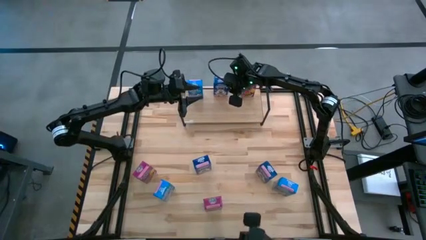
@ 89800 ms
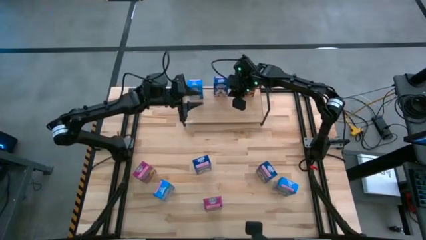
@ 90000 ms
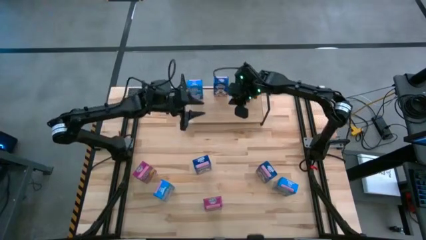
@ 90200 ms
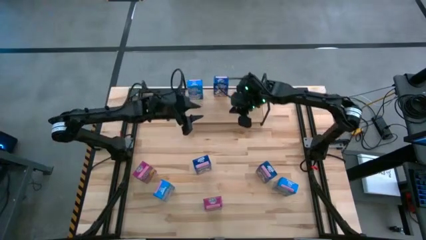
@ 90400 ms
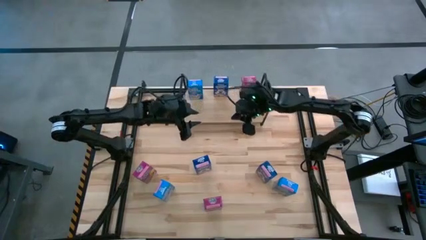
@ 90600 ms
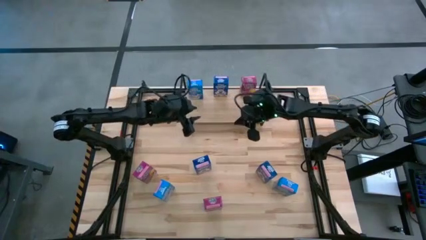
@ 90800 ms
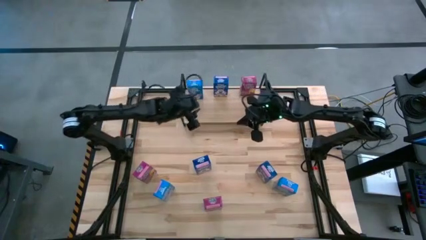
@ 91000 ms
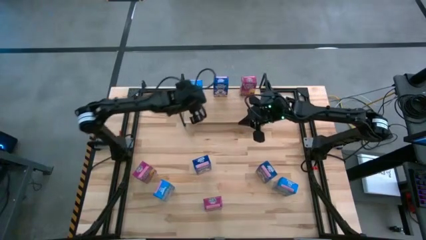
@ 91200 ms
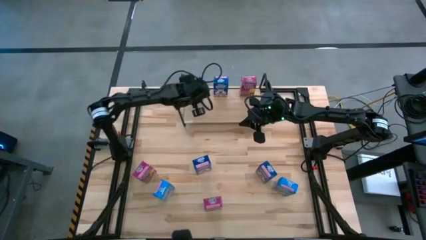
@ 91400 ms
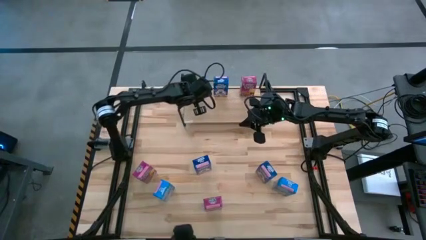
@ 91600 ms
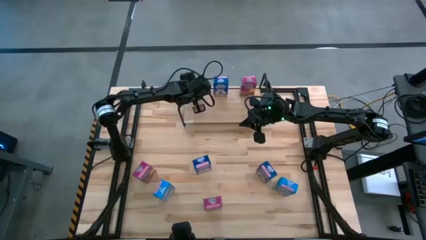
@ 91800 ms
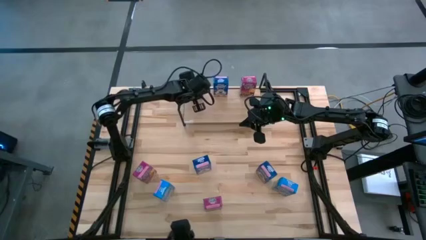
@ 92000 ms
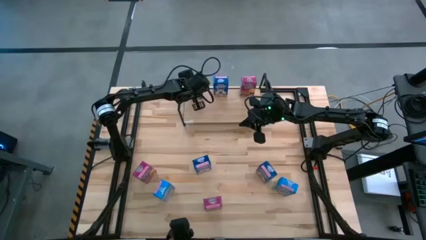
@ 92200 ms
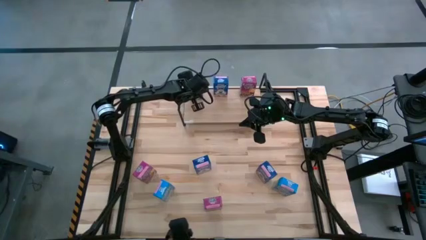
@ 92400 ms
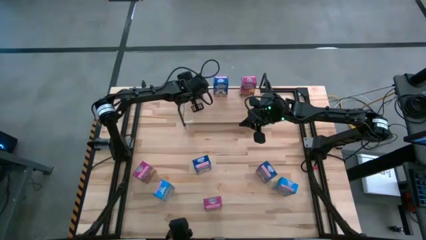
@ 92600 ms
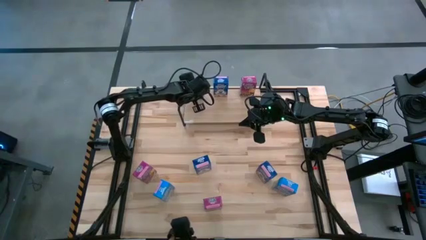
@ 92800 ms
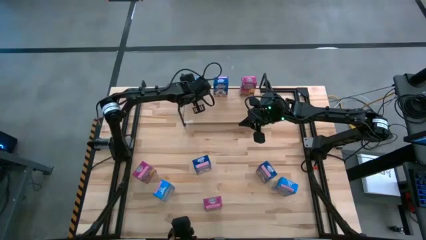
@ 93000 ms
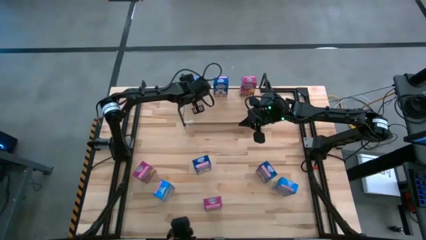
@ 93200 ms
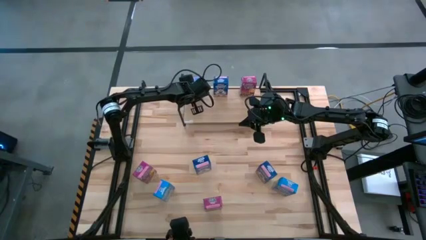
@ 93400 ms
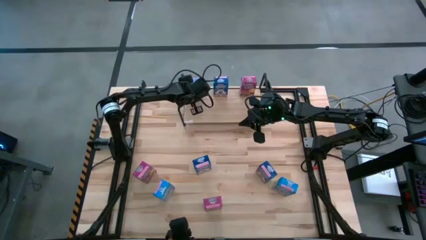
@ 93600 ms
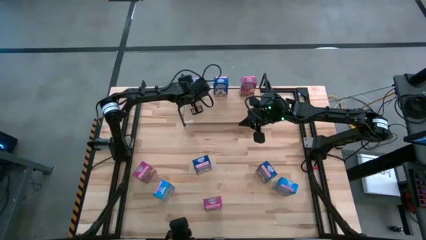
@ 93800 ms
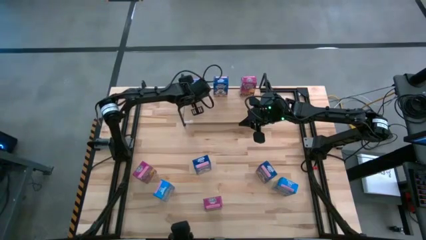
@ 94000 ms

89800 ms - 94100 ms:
Task: Stack cereal on shelf
Adjust the blue cereal box on the shelf

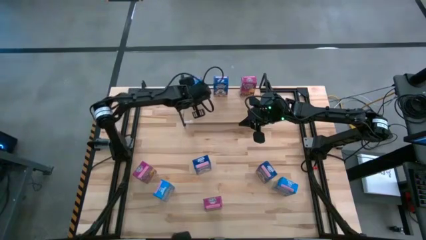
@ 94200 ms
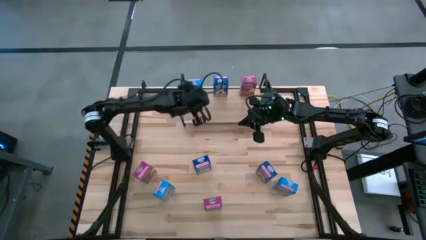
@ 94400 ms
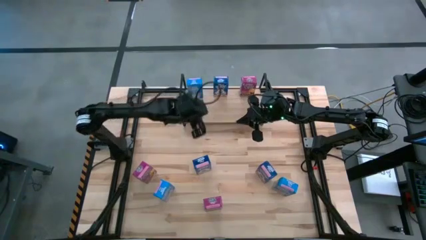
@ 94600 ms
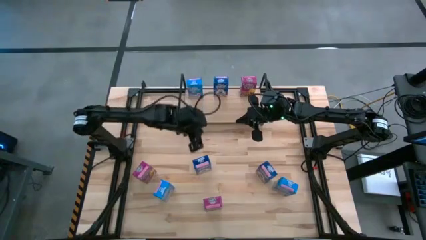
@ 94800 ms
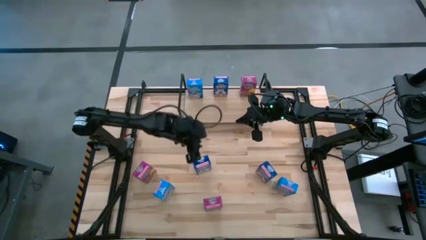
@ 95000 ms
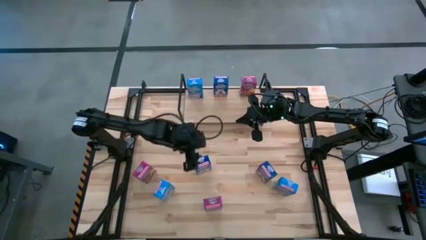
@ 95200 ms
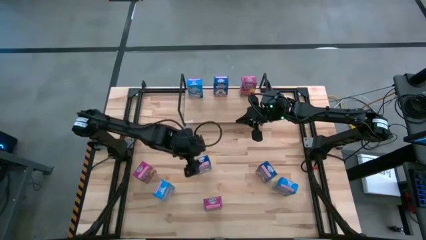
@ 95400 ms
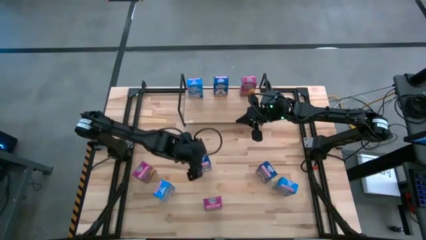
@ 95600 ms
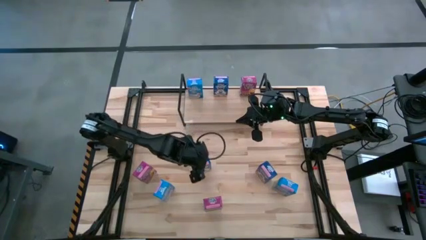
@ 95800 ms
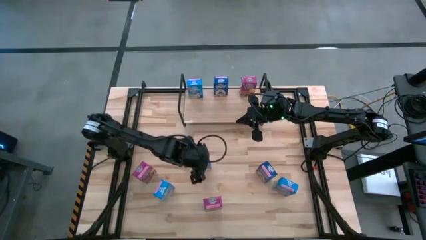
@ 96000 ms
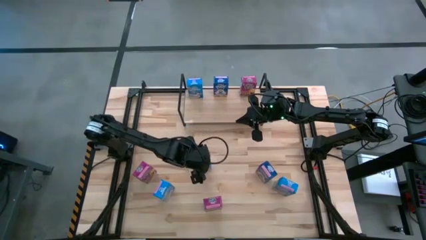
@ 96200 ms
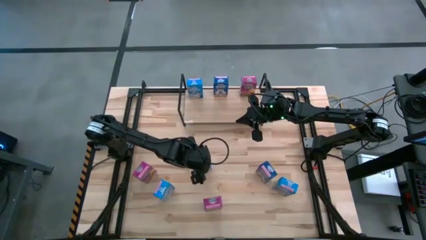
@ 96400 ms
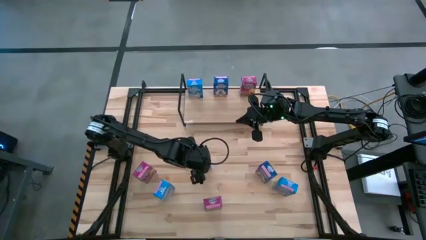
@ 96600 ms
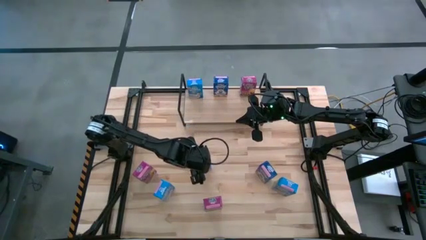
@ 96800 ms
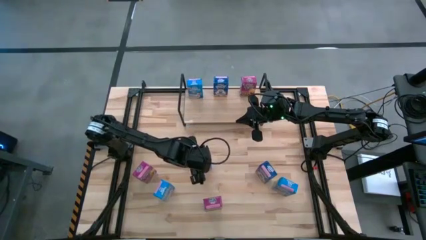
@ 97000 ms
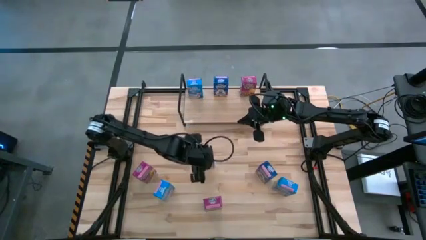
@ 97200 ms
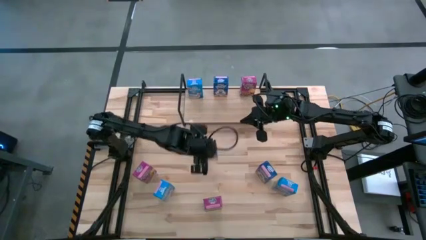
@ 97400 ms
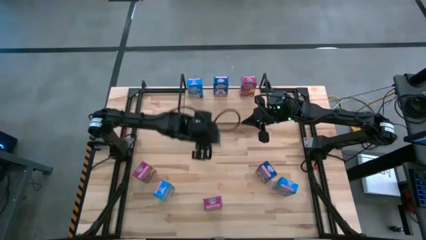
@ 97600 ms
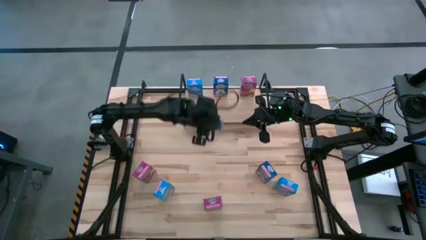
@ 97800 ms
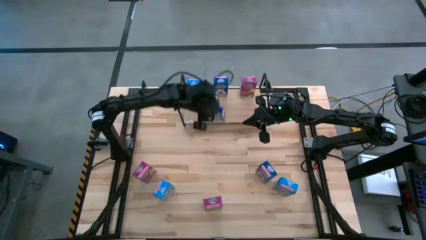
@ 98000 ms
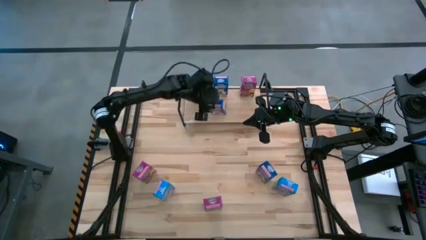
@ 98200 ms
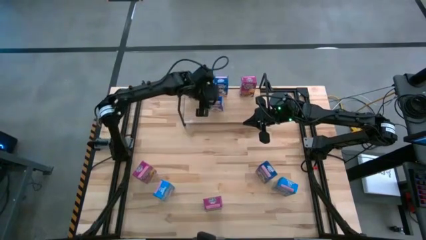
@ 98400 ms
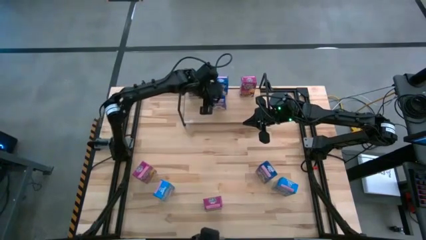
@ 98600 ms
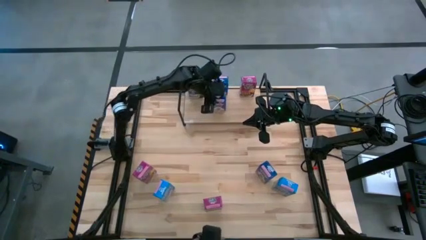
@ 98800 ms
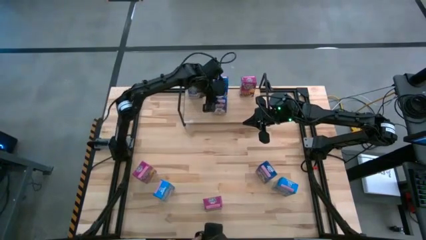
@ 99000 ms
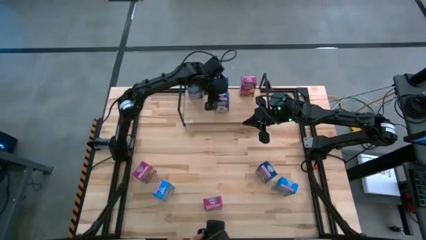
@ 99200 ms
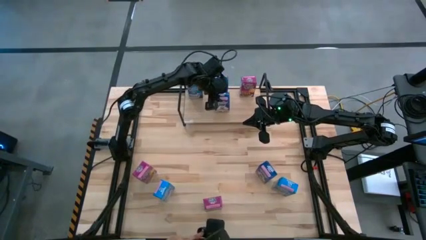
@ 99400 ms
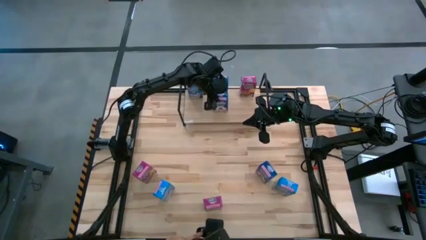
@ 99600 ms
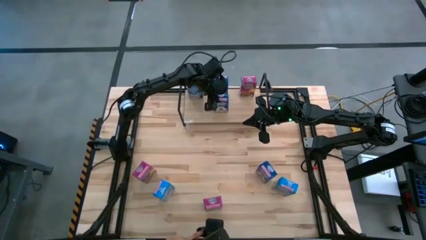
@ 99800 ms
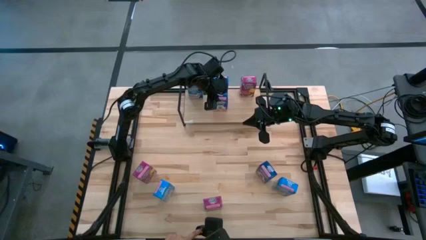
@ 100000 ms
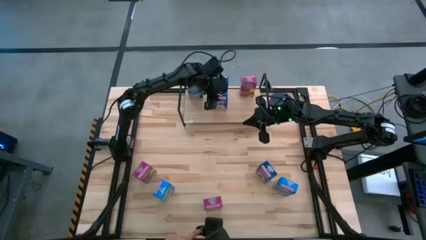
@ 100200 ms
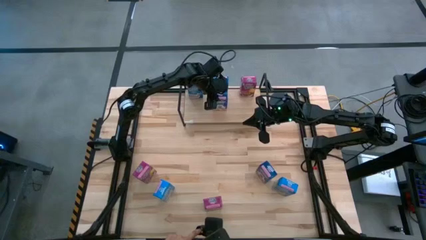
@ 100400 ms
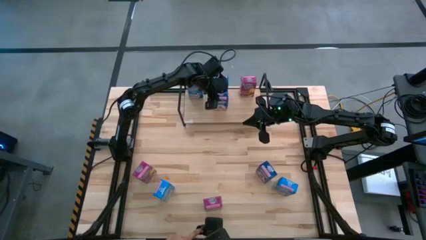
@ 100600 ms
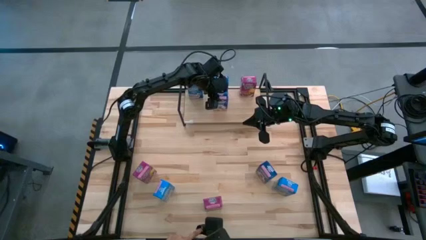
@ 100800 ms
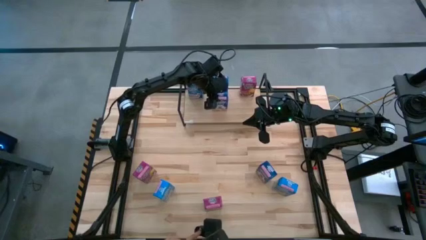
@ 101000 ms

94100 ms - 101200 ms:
Put the left dark blue cereal box on the shelf aligned with the other dark blue cereal

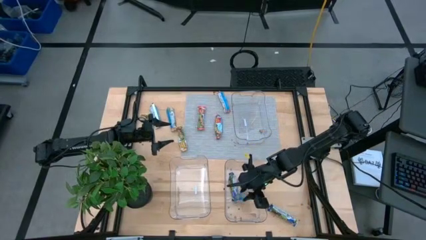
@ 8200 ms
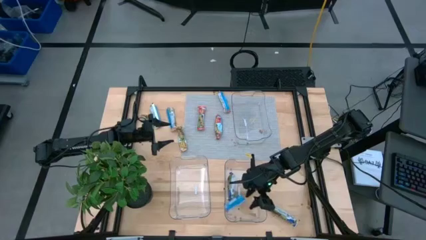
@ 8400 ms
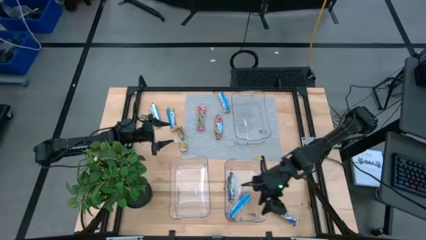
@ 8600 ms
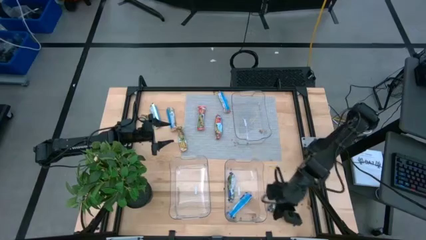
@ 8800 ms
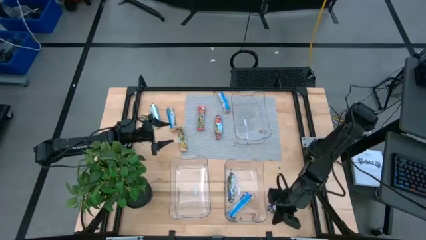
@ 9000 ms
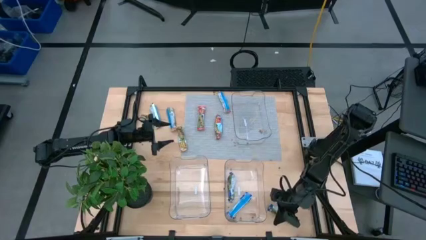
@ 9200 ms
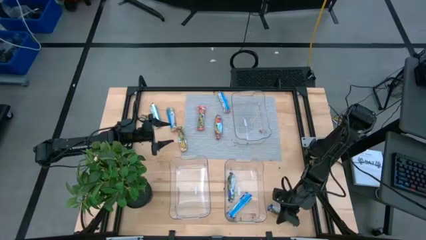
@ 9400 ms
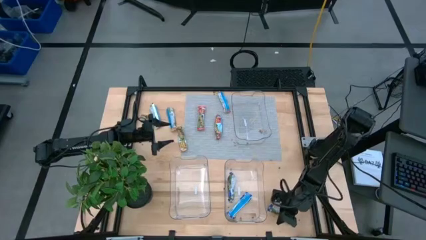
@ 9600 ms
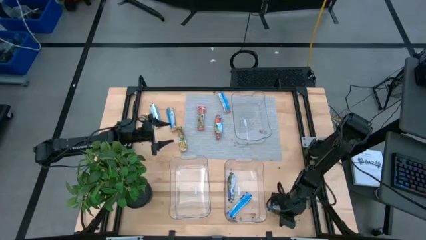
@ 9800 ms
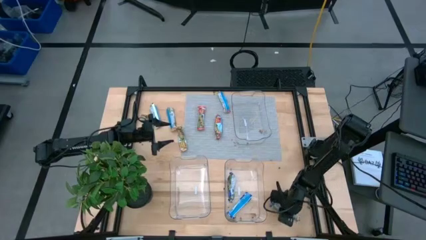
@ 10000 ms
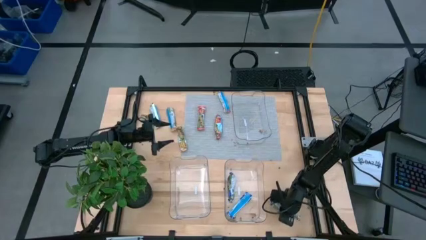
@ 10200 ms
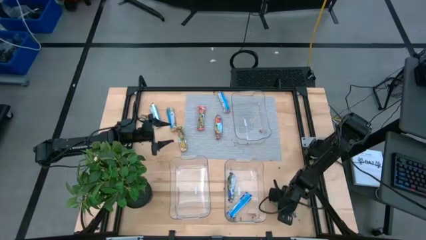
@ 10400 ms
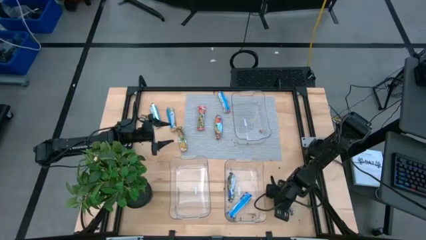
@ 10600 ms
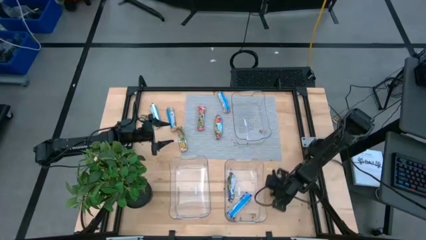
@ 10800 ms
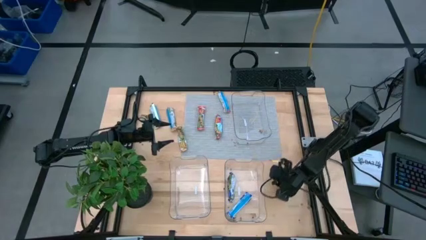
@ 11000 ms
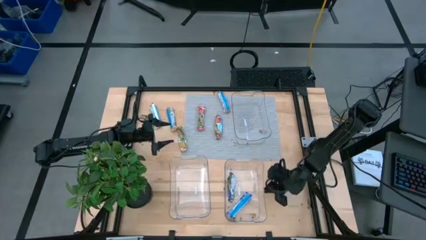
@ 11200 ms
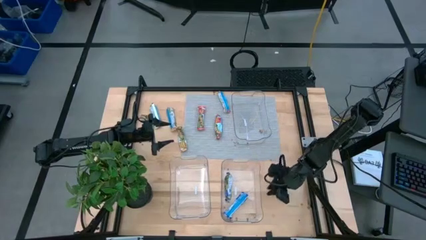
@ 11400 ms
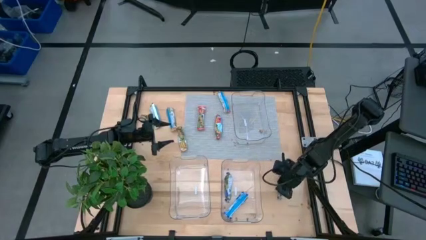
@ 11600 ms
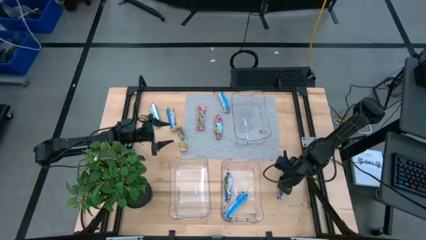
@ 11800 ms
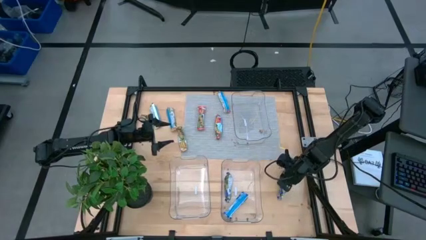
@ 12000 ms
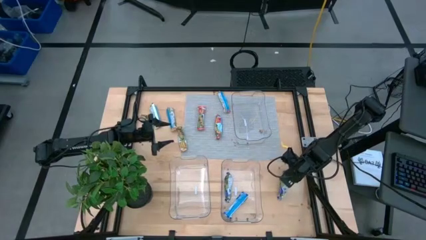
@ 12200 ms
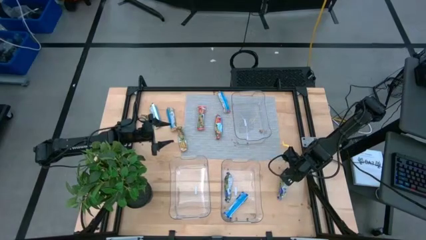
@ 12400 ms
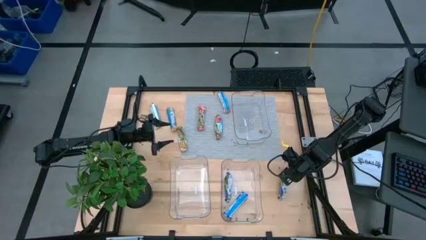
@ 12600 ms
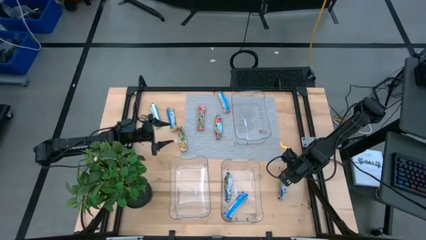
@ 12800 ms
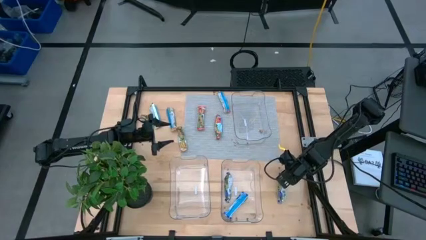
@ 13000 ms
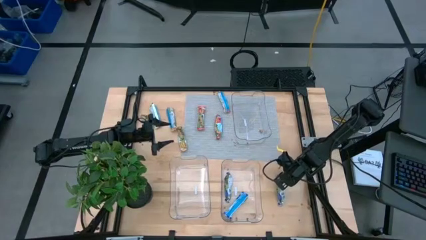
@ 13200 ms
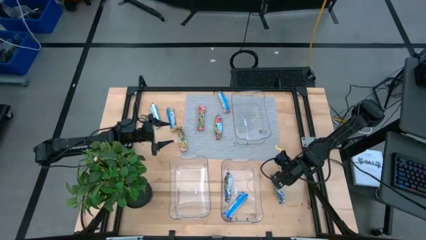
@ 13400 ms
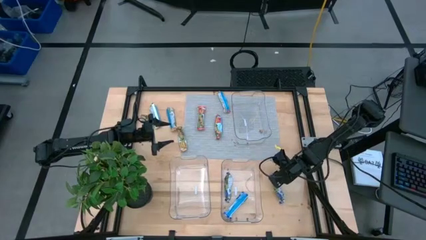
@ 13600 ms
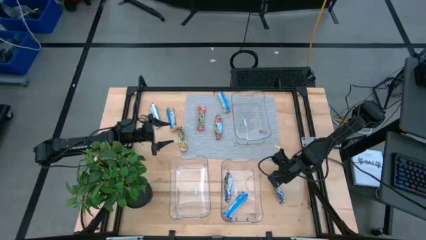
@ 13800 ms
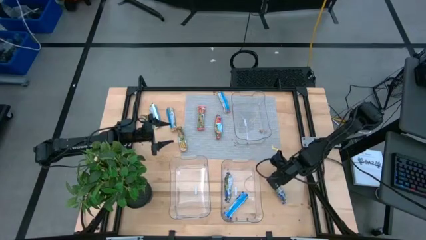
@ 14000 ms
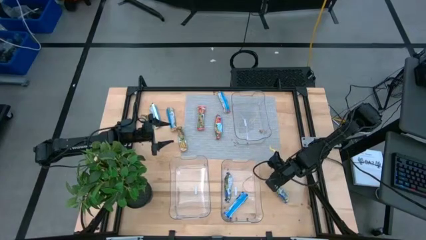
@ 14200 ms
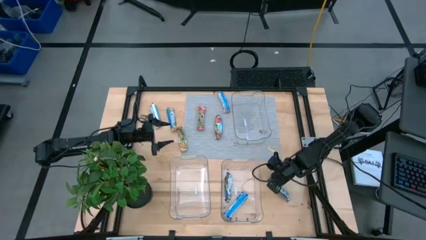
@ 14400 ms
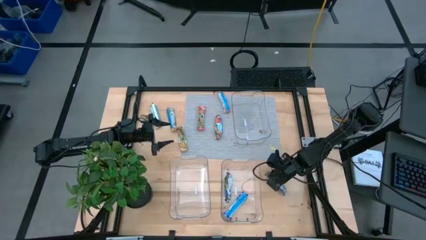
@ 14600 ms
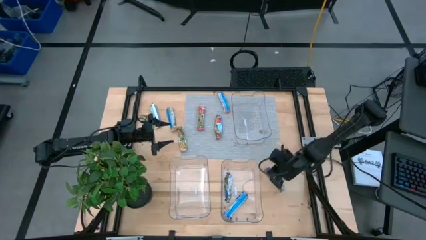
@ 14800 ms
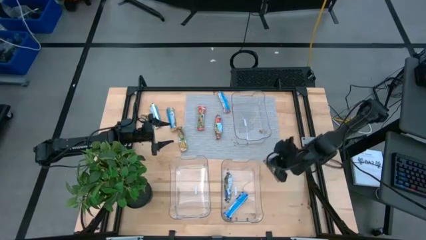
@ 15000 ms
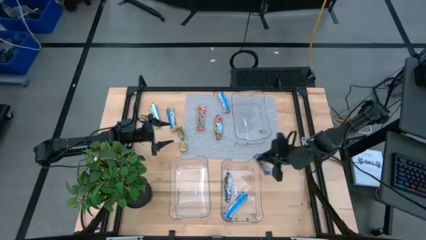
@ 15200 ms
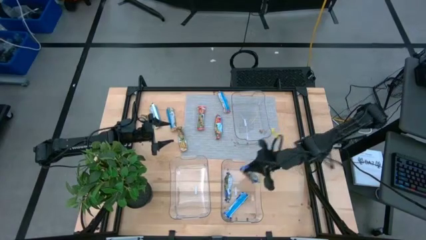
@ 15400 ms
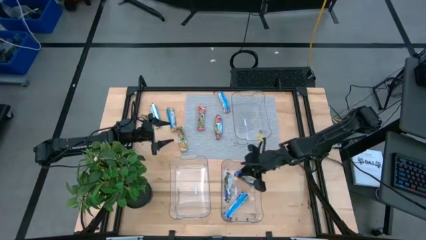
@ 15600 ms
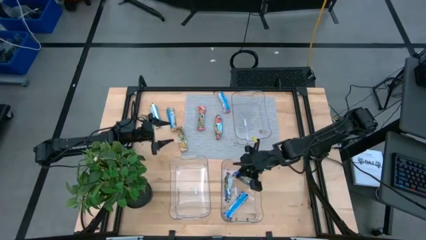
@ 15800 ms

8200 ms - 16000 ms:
Task: Pick and place Granola Bars by type
Put the blue granola bar into the bottom right transparent bin
